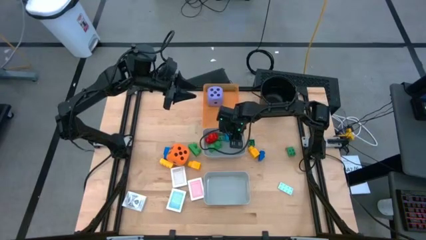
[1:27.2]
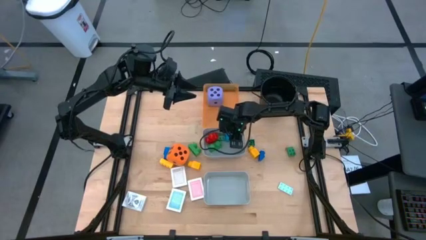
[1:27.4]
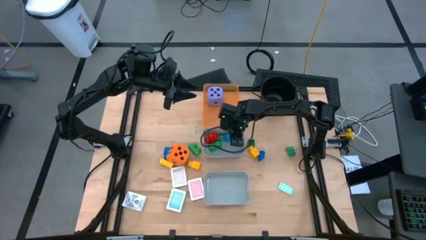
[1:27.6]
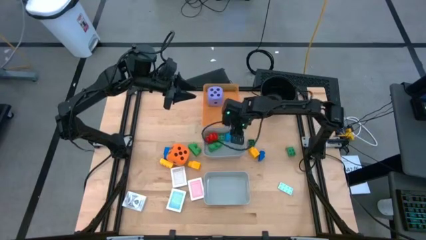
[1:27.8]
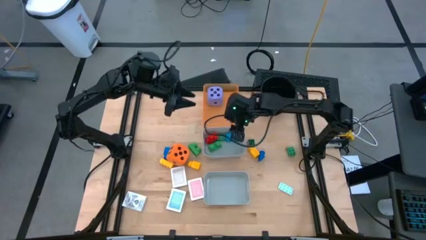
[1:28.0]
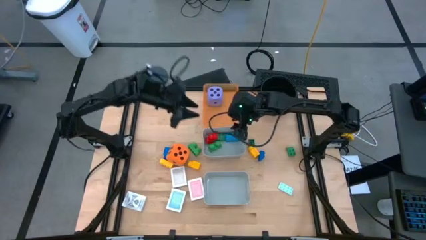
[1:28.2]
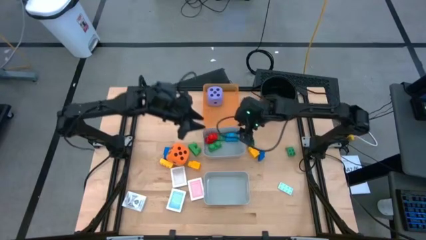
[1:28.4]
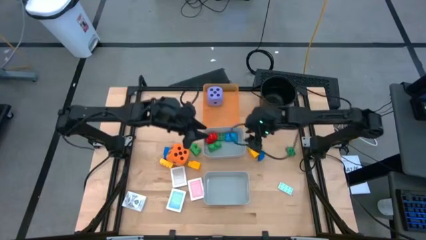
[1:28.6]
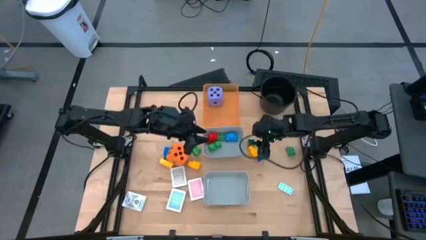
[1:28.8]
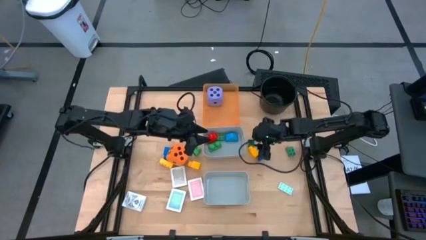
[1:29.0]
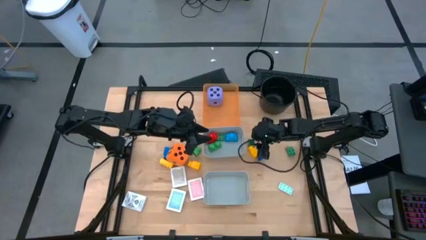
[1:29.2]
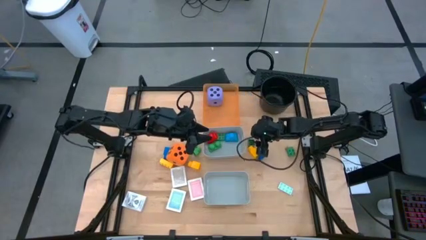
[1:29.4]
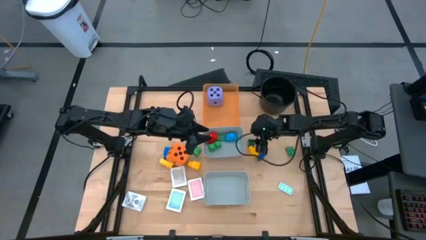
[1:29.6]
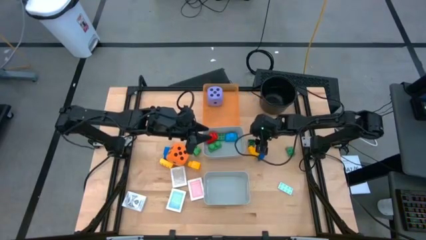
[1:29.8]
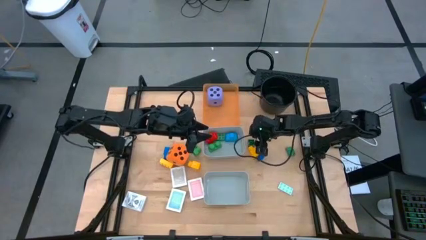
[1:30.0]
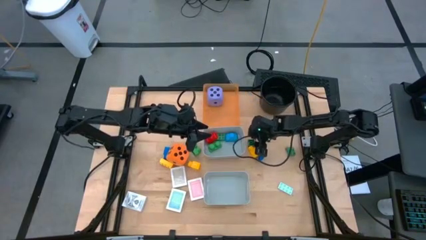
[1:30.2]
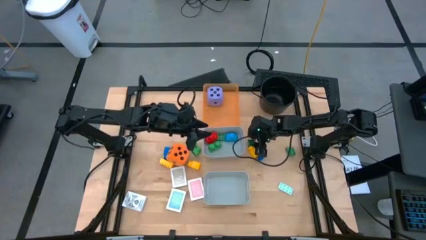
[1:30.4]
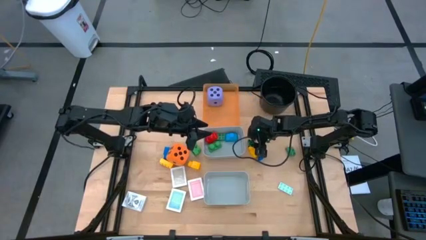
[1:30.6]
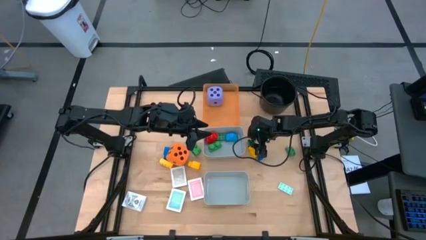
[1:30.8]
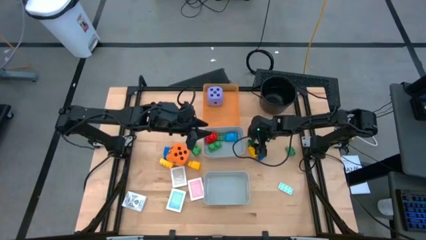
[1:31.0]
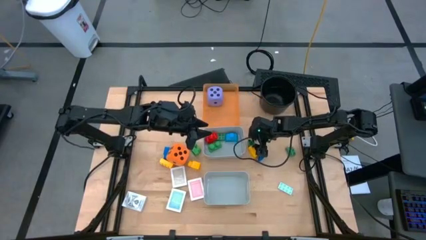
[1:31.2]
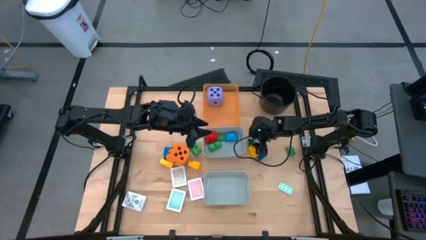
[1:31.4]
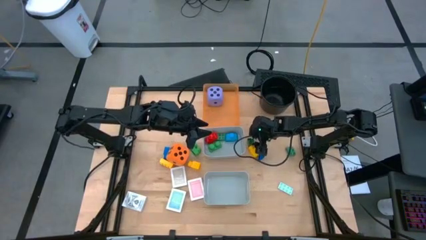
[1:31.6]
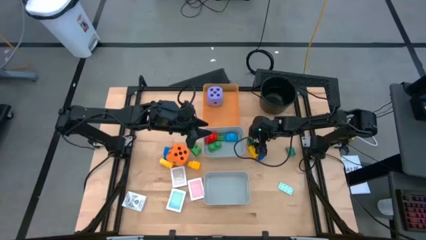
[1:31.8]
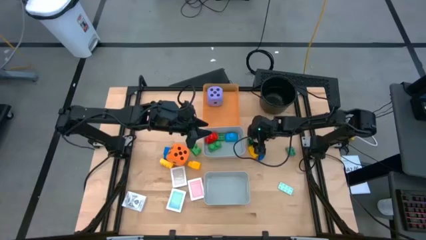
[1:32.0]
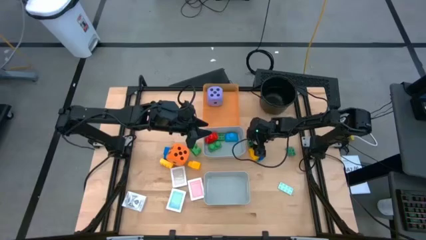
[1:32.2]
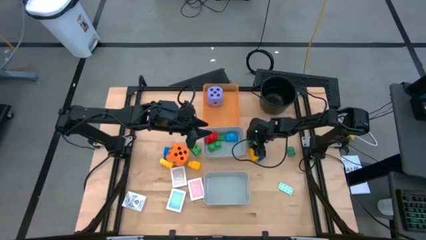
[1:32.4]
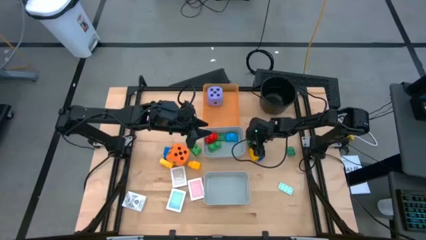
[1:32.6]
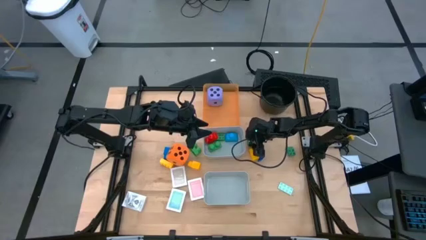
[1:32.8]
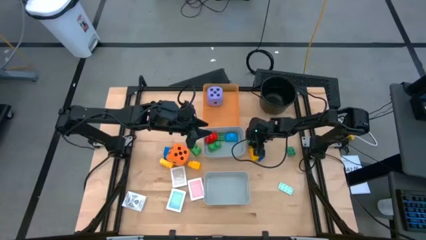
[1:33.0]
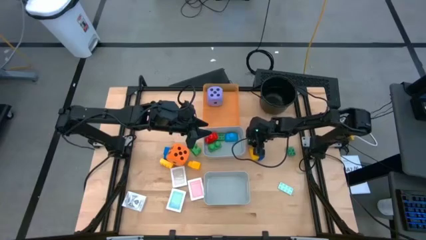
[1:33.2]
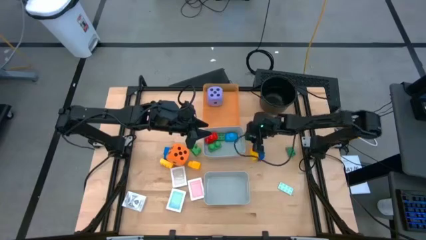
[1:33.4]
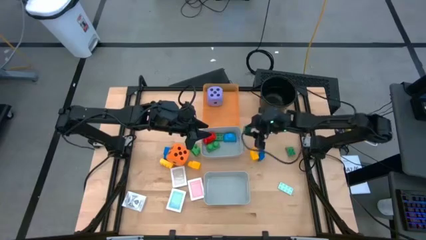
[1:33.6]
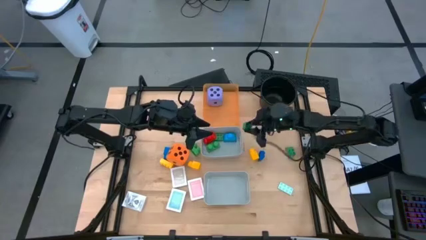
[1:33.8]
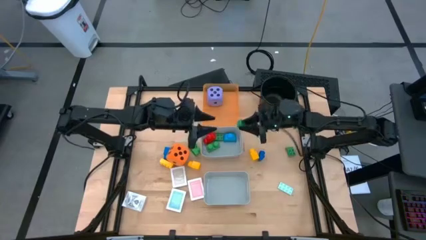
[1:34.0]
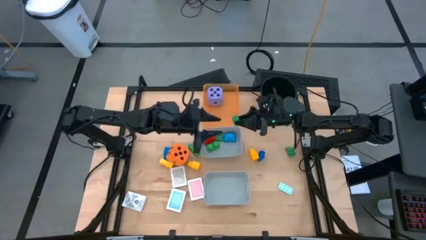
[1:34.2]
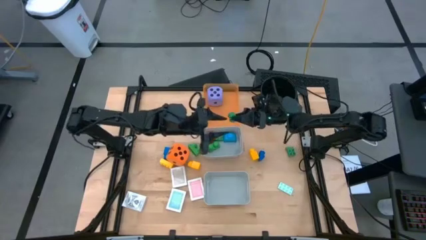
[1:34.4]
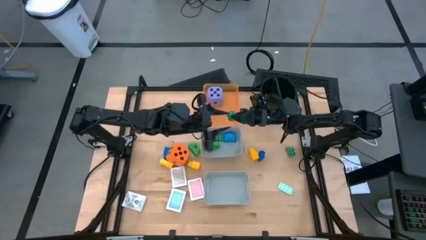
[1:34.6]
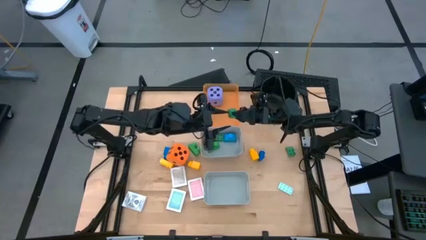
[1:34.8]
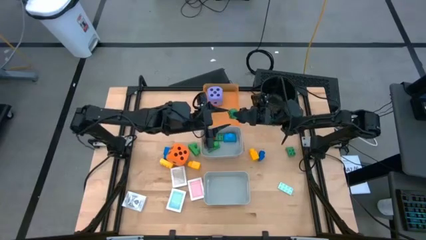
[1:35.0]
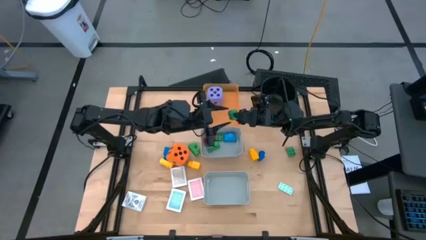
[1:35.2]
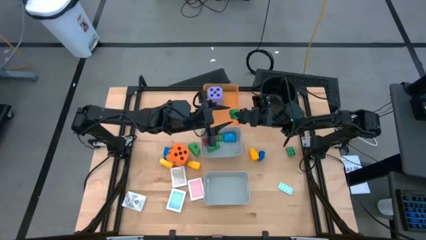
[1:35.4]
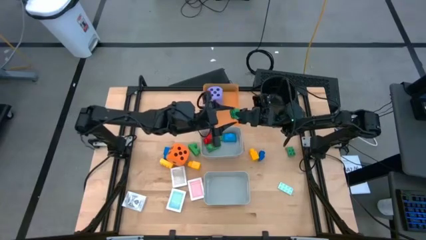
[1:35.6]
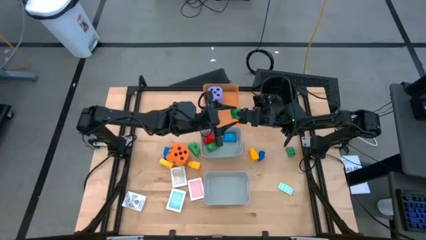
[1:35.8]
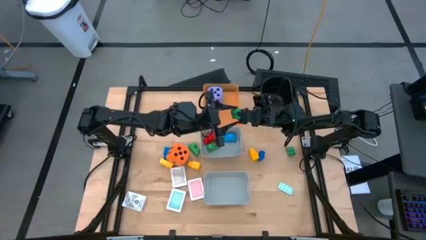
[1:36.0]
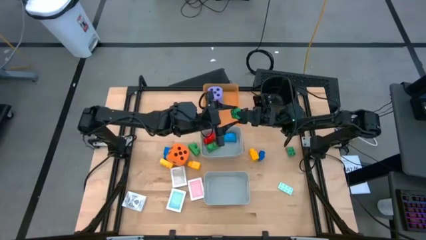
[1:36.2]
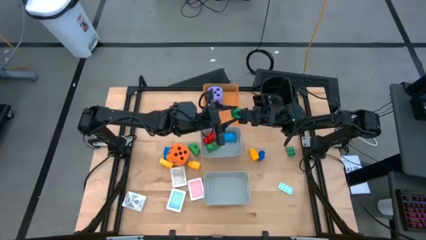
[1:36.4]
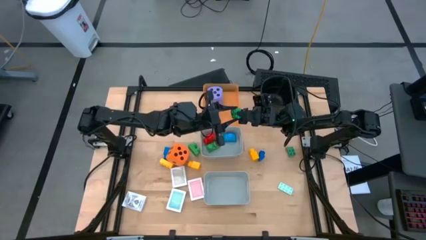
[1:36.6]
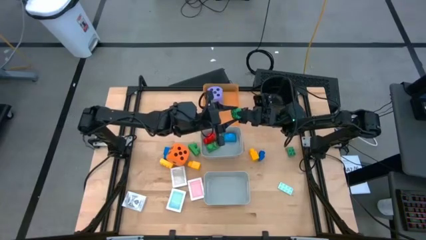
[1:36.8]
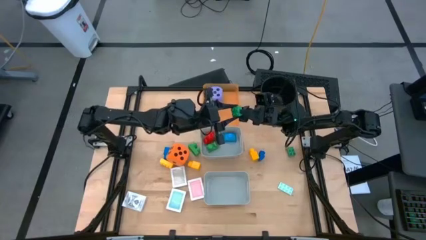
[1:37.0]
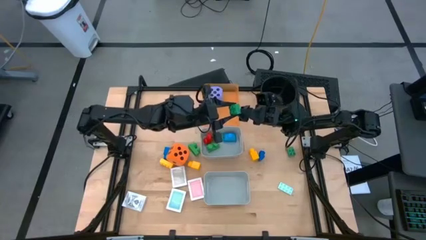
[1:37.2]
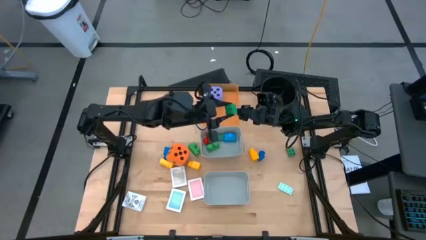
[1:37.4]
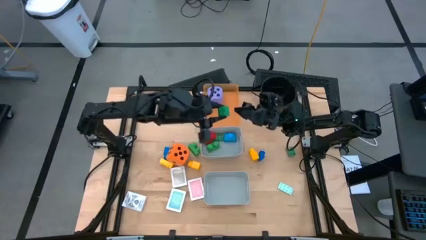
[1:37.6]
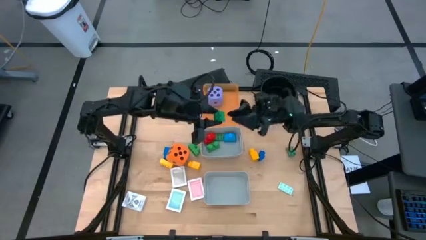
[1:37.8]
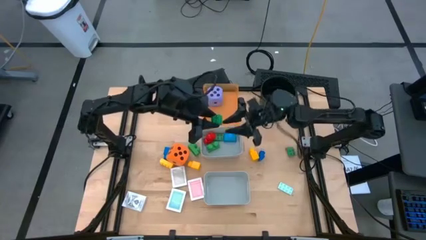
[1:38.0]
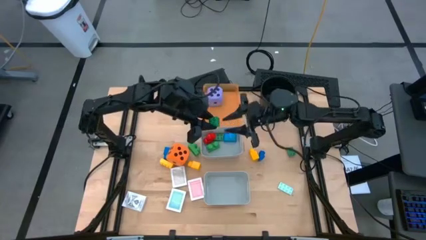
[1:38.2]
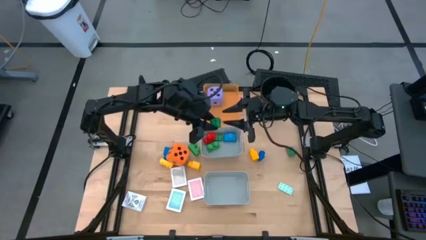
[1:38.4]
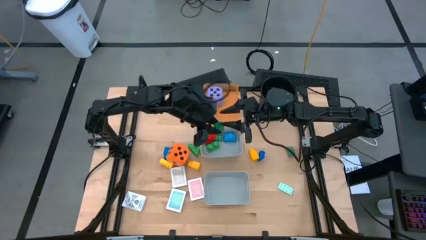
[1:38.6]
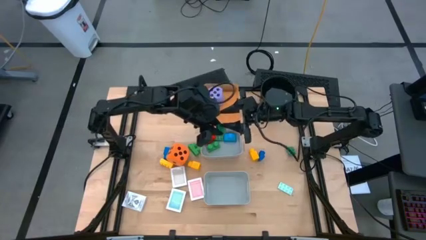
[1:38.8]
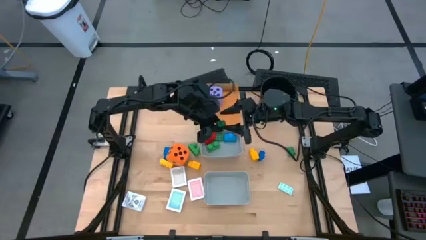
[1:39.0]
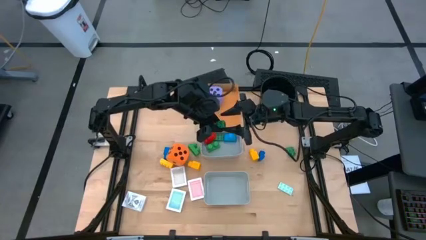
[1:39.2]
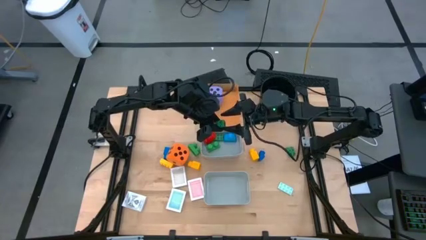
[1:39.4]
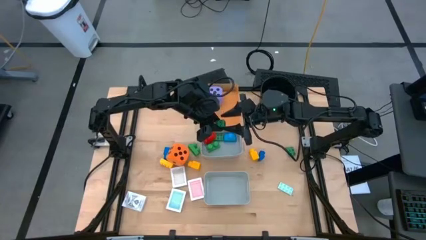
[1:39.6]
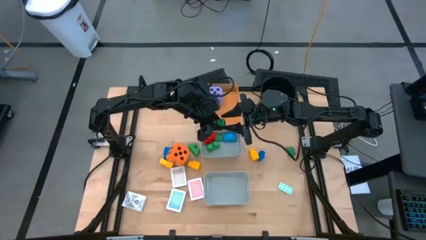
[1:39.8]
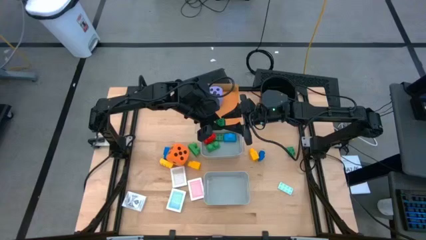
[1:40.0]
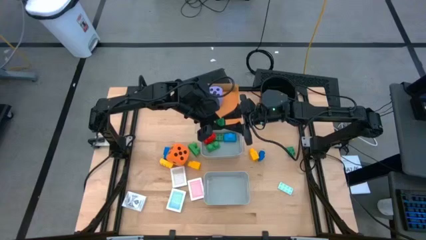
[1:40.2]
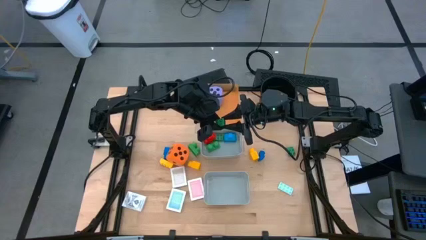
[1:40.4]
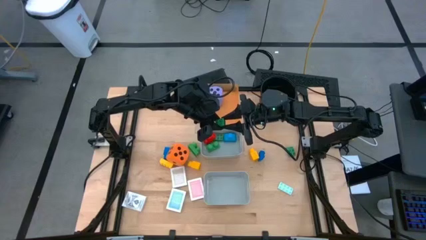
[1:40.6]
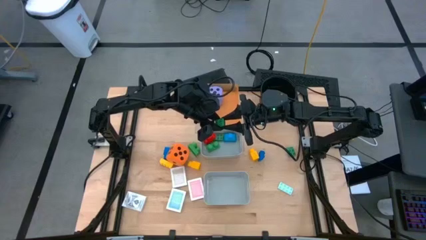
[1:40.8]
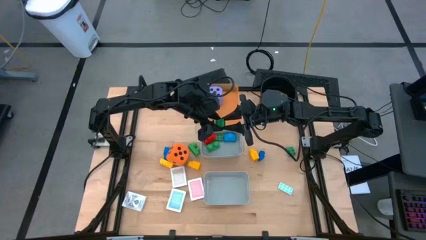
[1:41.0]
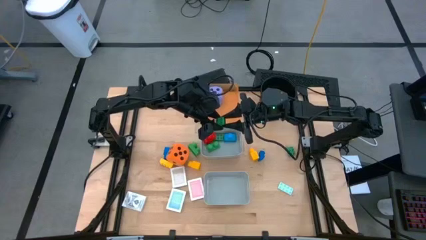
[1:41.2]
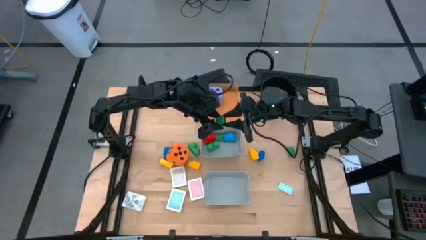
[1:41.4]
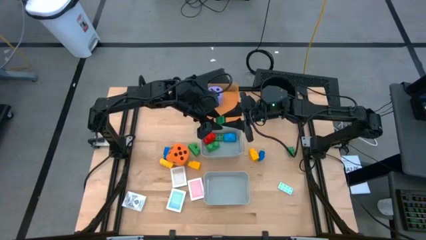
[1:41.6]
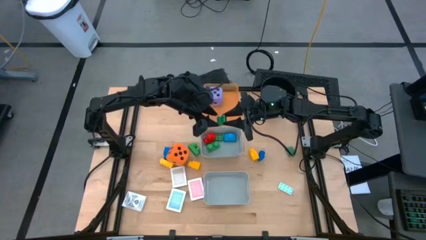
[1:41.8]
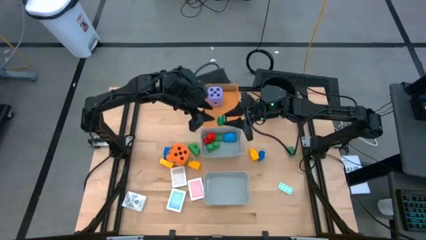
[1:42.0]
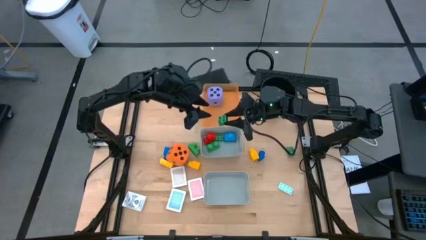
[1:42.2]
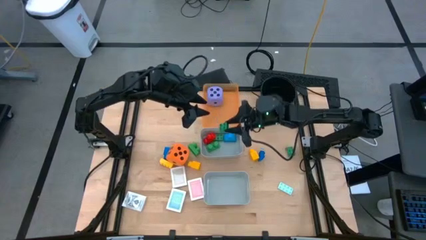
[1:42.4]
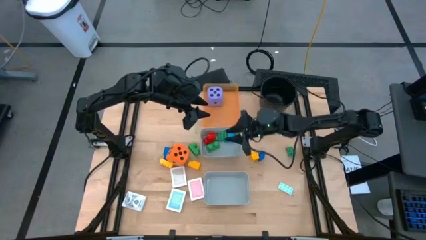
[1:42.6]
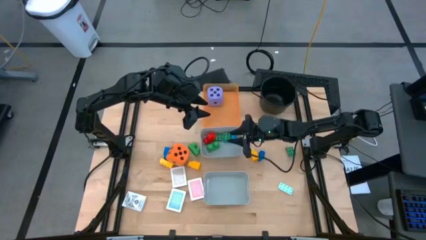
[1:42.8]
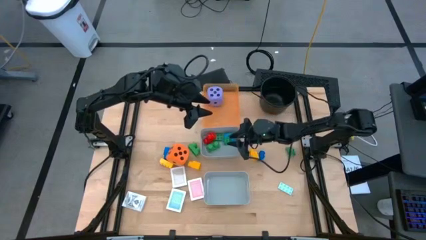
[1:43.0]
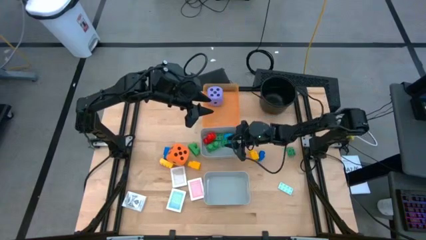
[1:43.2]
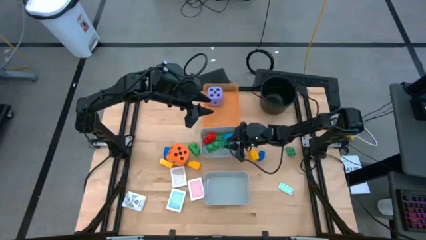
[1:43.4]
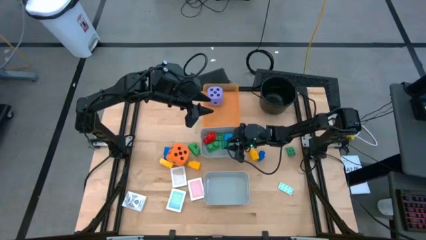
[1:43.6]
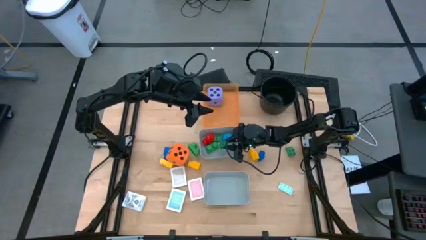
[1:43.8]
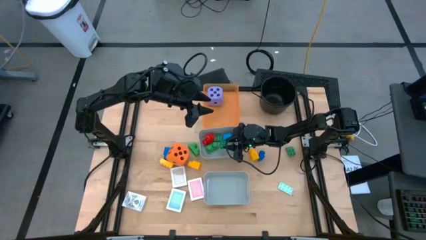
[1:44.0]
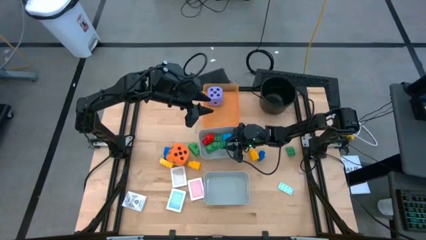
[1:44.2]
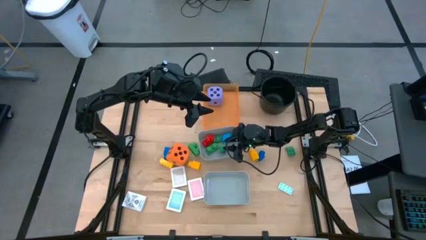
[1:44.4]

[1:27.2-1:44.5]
Task: Pick & Place Toys
Put the green game piece into the top gray bin
